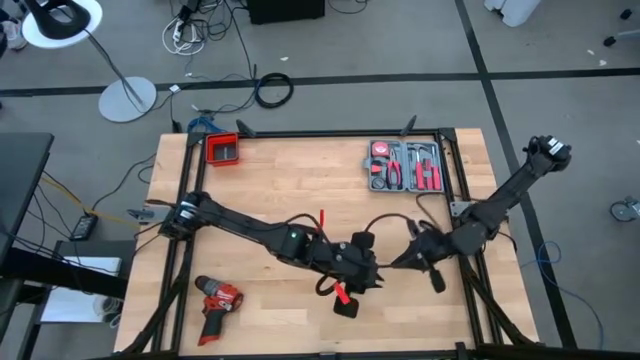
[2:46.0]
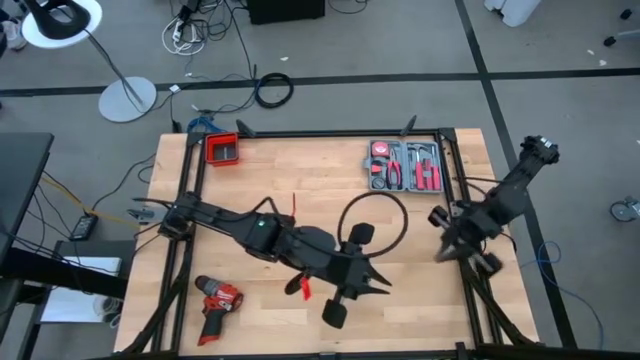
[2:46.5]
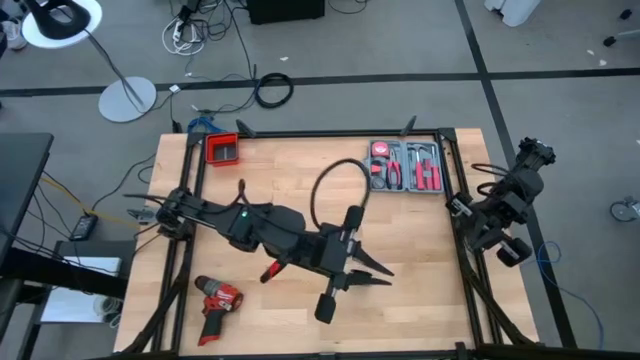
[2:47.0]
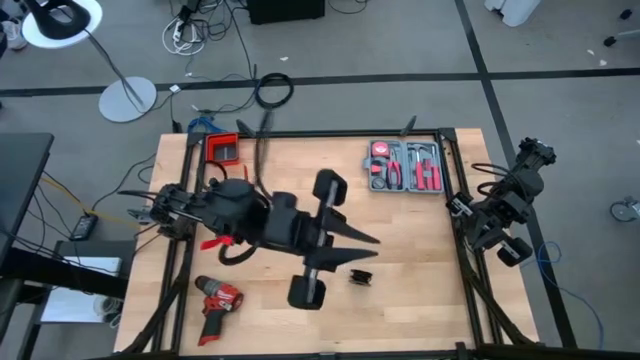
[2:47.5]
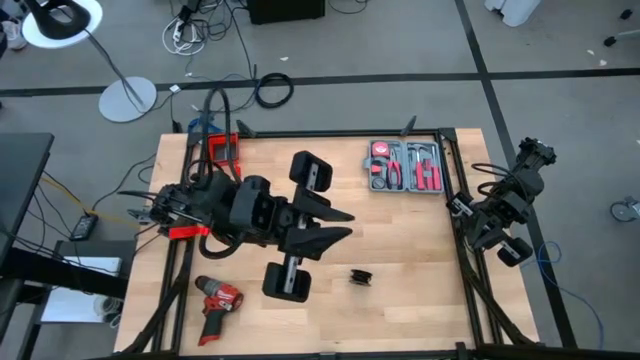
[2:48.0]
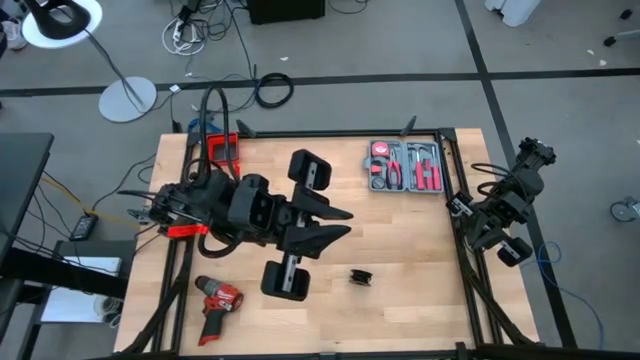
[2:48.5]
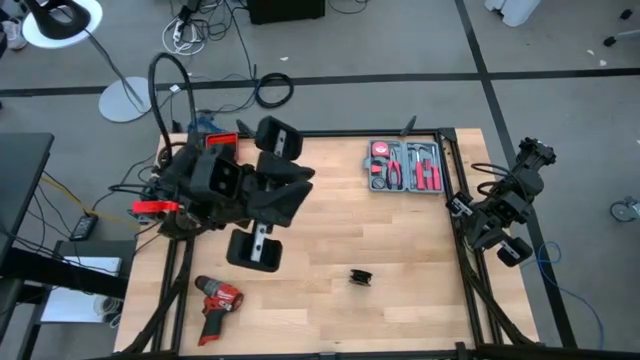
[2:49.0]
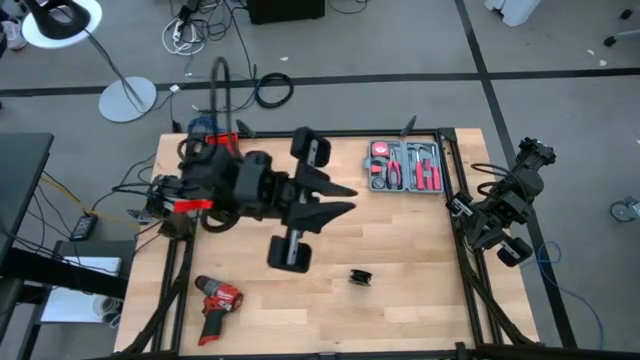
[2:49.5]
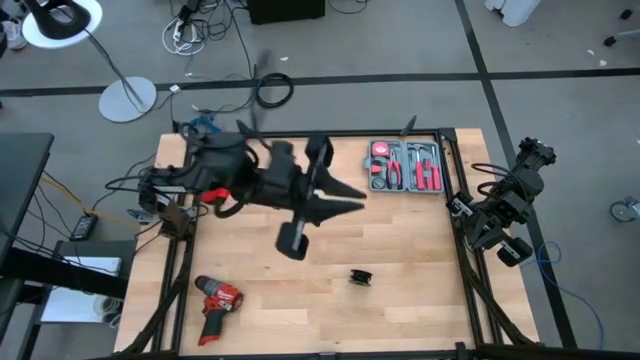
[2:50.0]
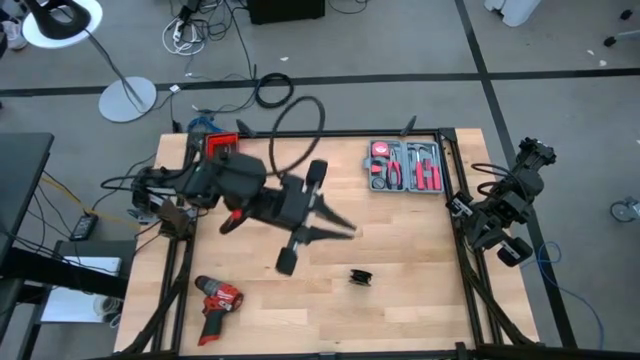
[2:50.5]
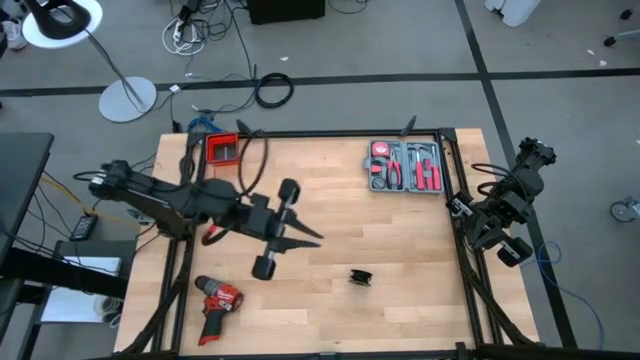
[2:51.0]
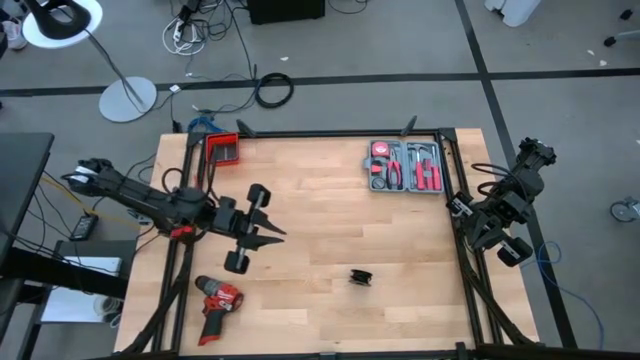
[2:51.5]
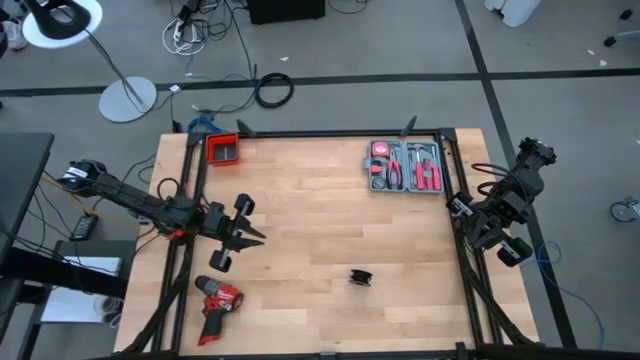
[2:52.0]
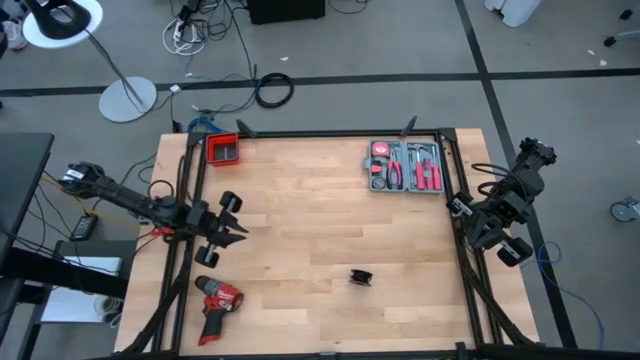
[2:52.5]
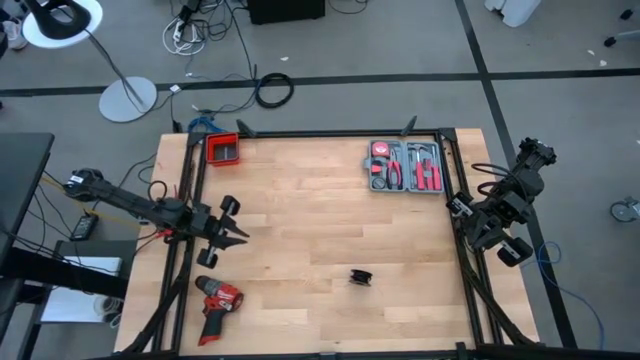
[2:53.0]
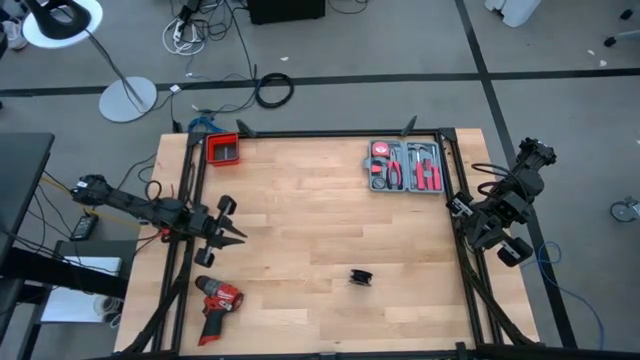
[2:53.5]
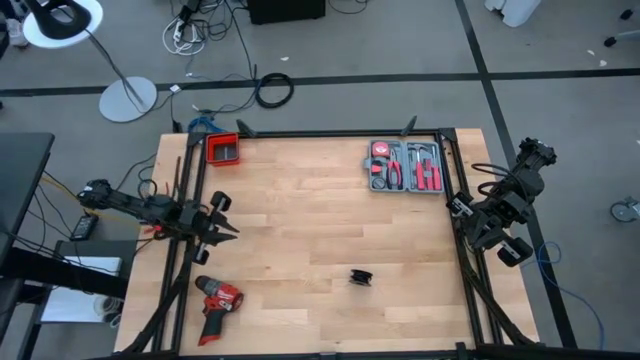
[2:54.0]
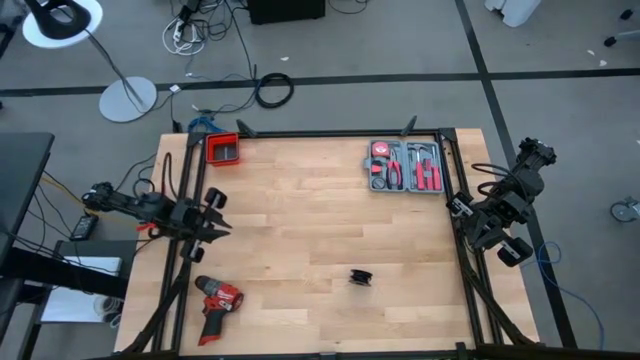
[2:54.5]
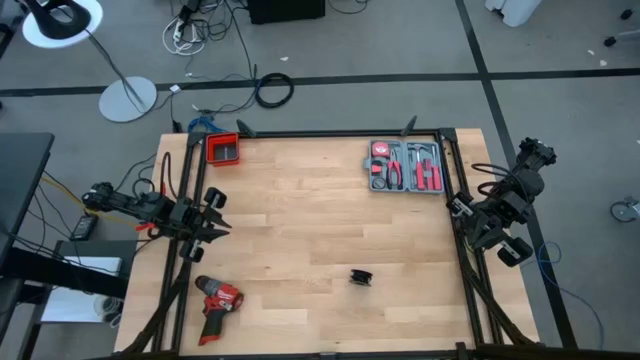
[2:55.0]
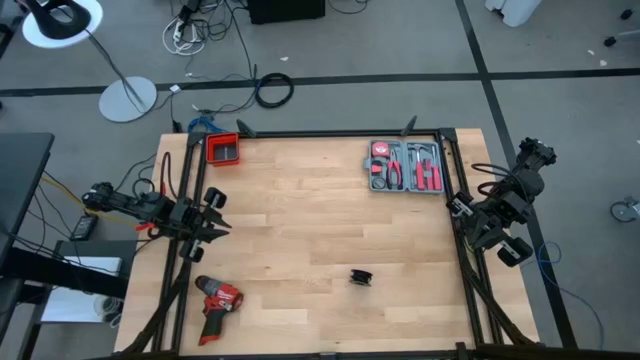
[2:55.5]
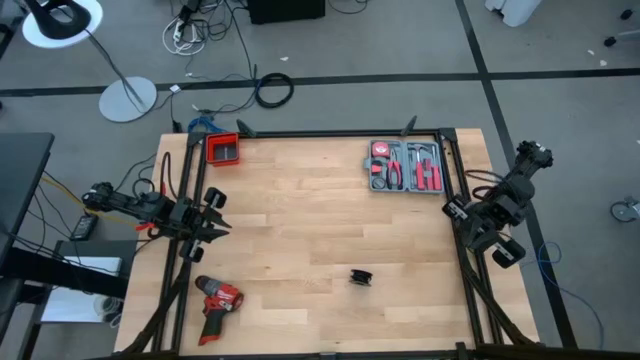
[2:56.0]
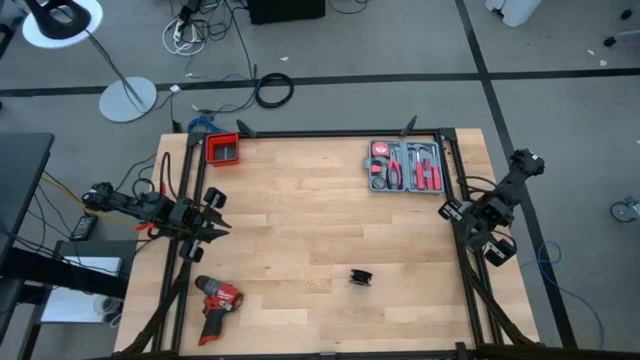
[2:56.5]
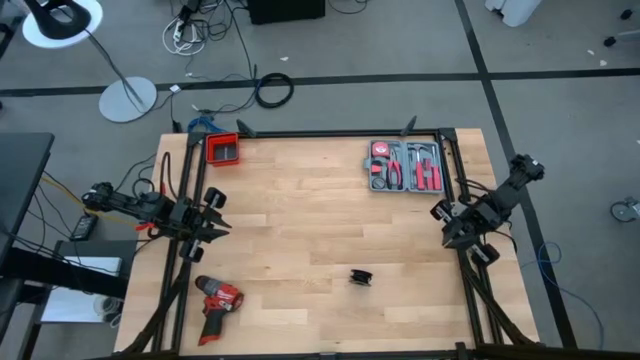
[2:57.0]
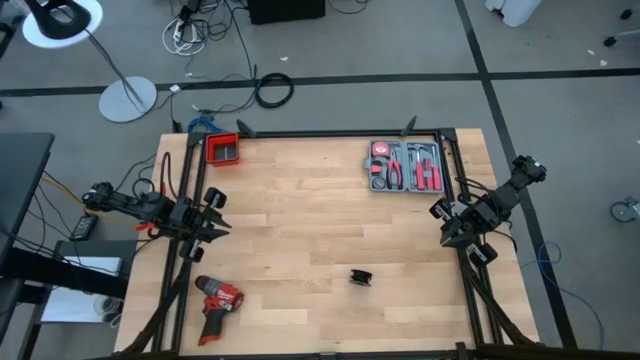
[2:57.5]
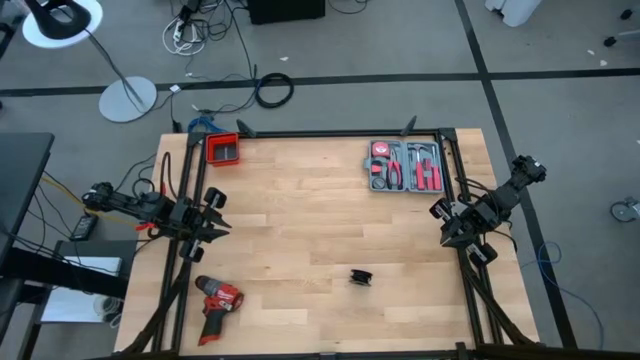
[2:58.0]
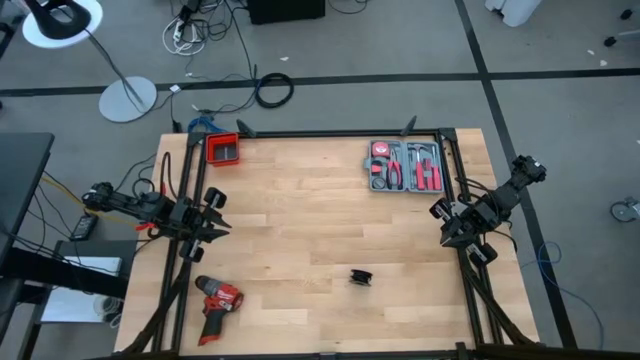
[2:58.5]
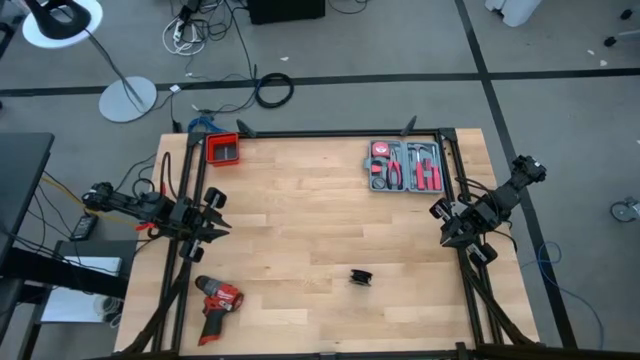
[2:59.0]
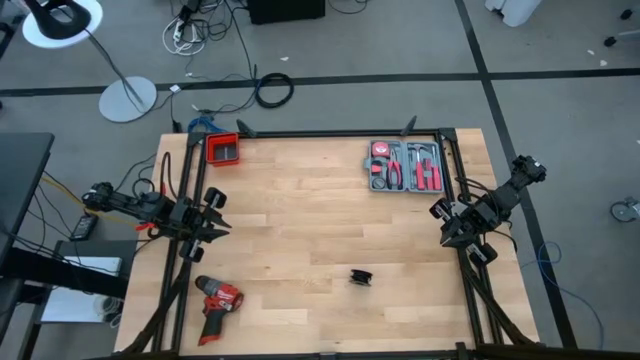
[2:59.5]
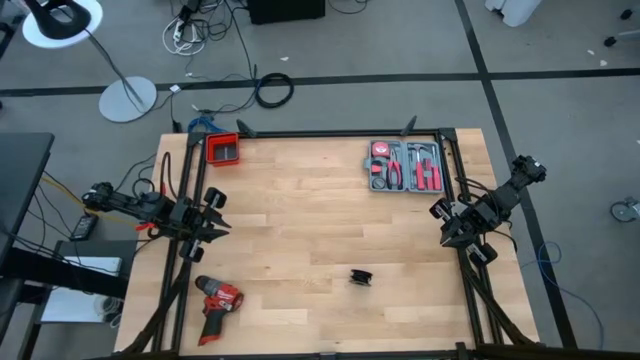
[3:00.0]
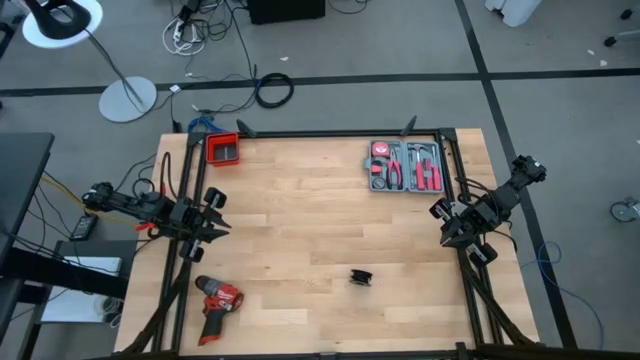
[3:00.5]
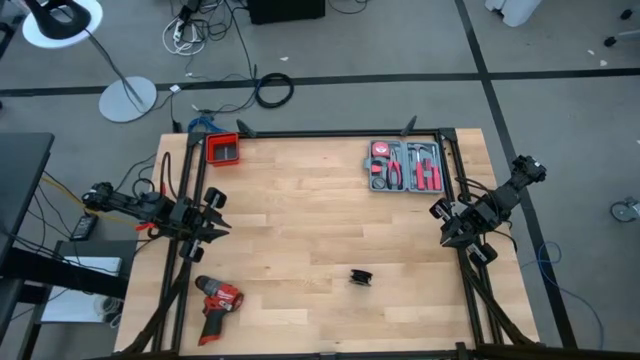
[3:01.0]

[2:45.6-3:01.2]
Task: Coil cords
Return to Home Position

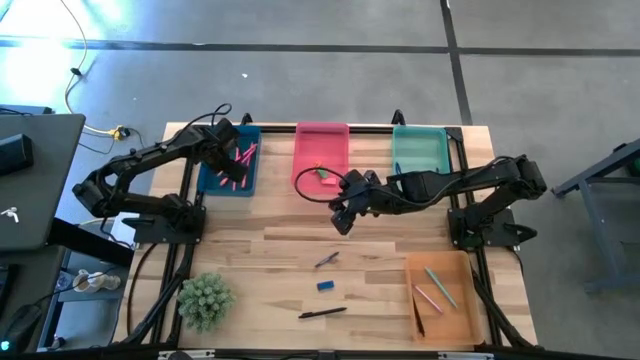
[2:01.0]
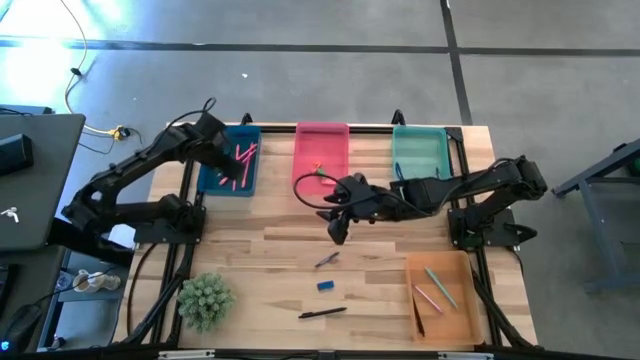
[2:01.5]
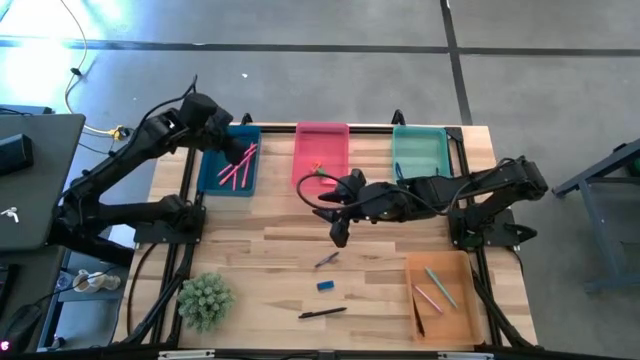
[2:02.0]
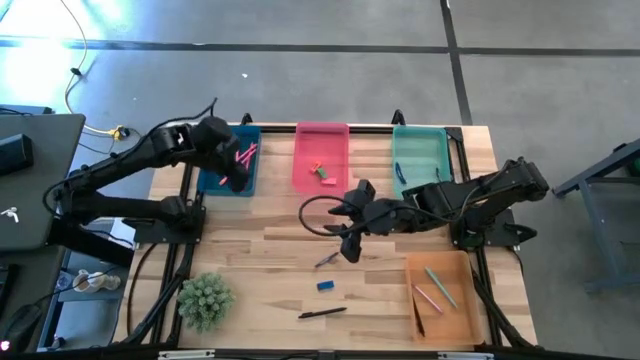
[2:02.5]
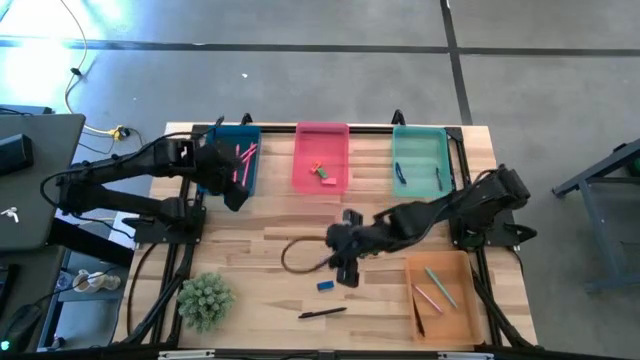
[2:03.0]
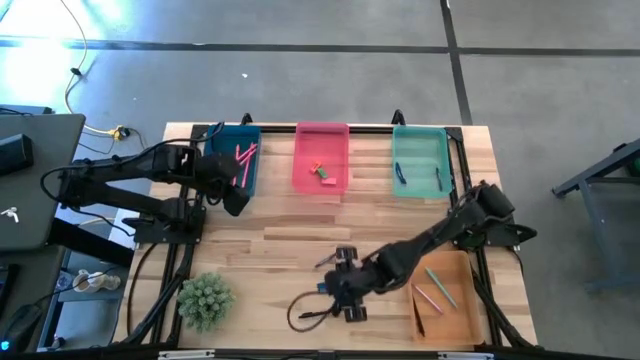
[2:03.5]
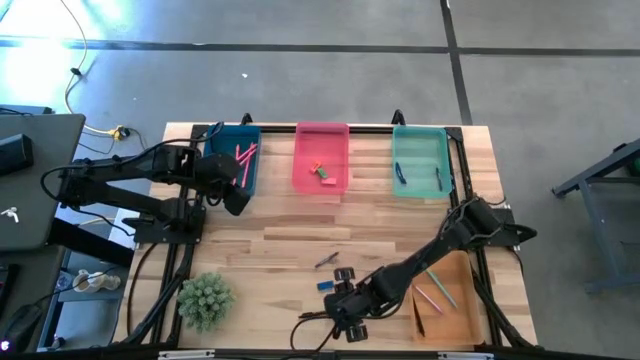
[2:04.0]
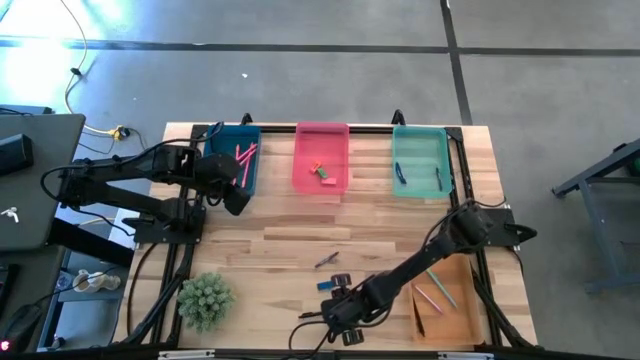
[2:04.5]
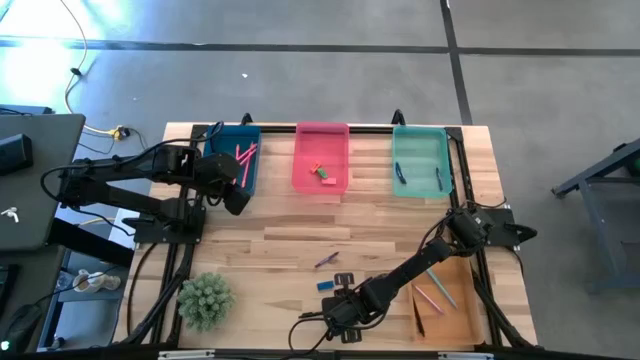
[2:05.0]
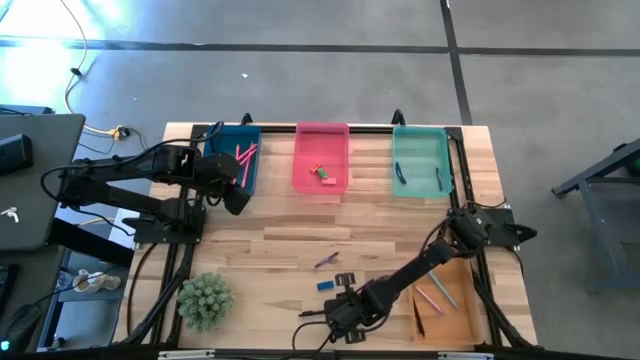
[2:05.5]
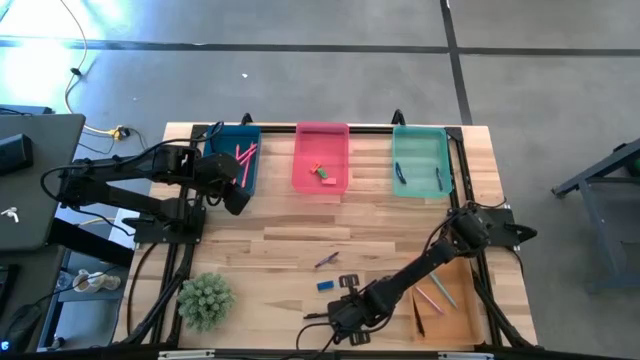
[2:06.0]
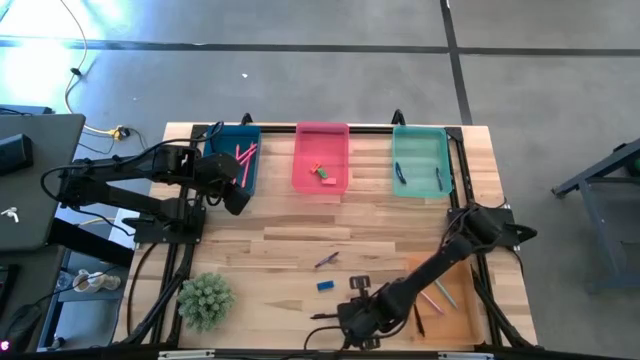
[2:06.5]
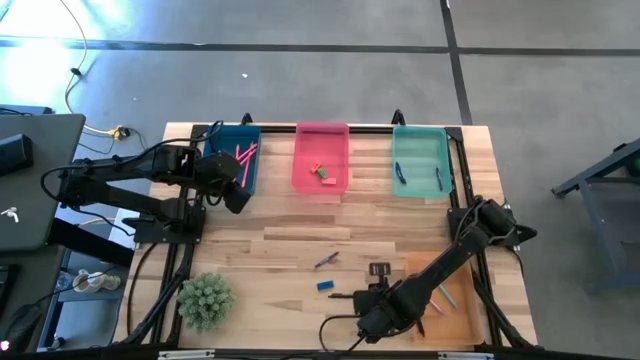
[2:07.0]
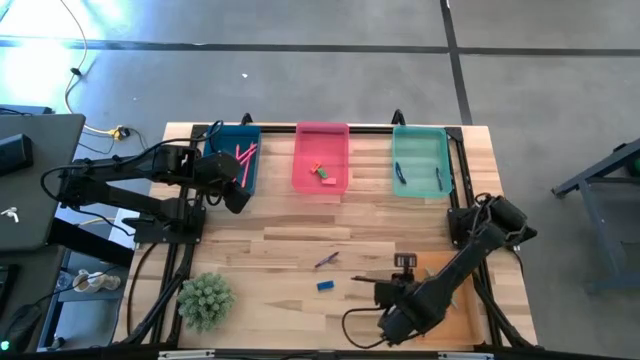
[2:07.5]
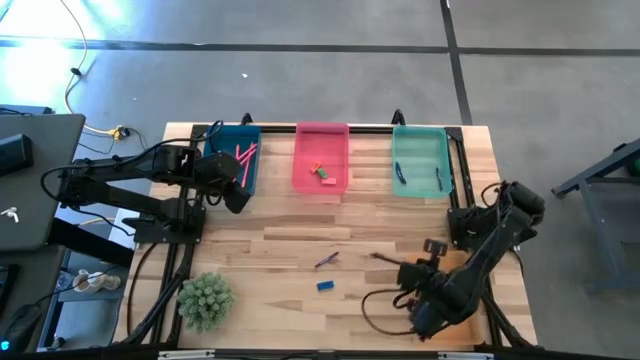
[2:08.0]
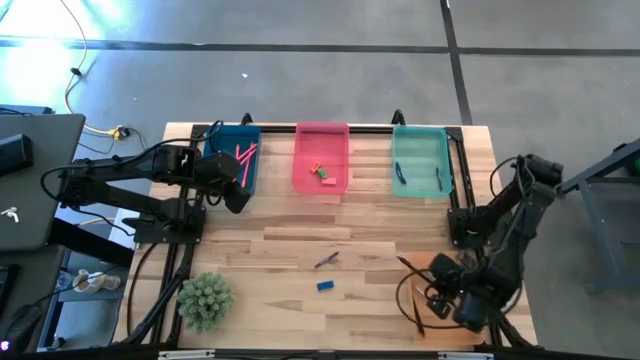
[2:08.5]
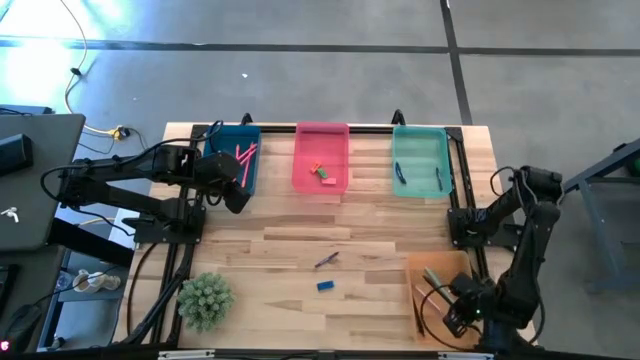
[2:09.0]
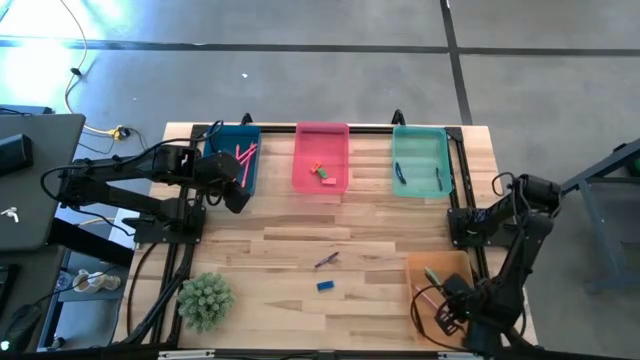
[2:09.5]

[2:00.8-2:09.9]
Task: Sort crayons/erasers/pens/pencils in bins
Put the black pen into the orange bin
